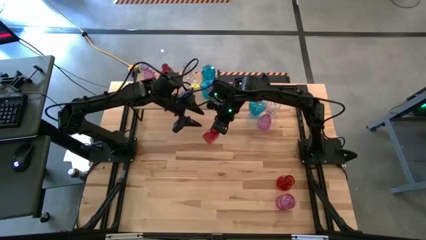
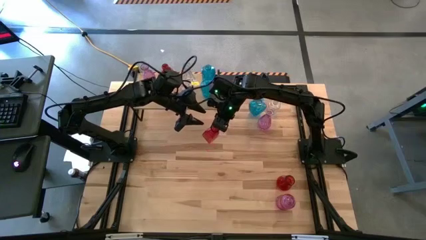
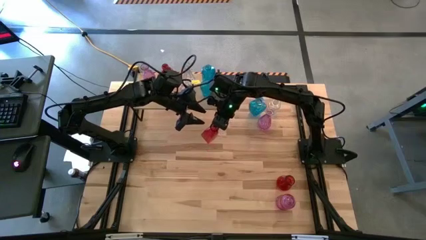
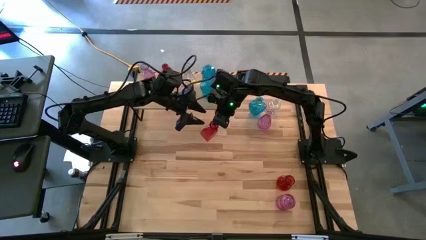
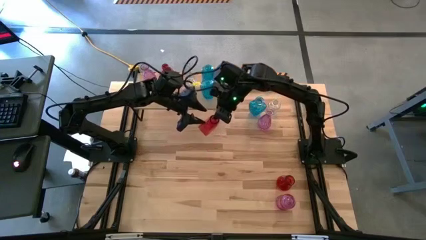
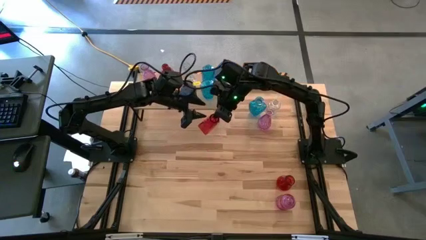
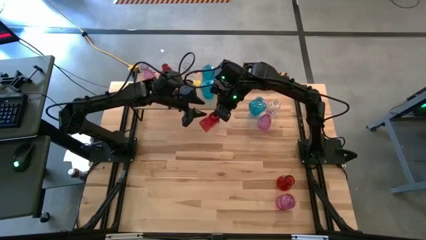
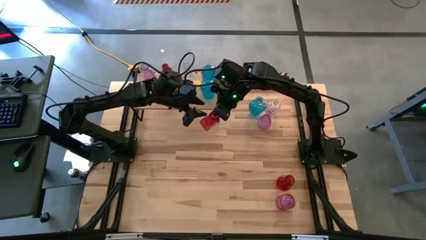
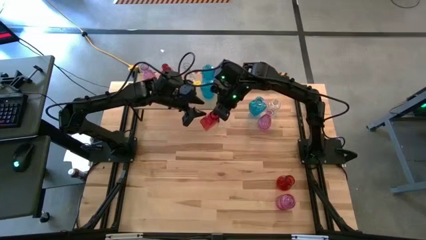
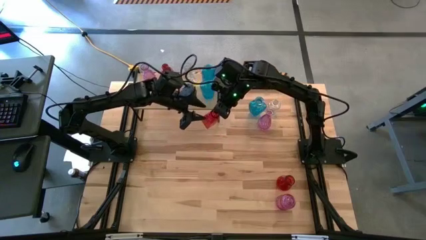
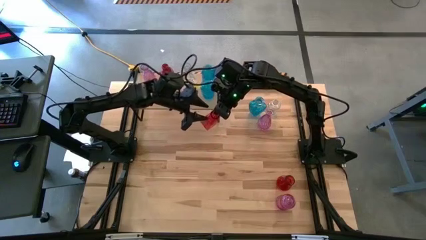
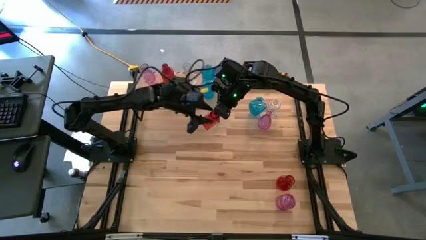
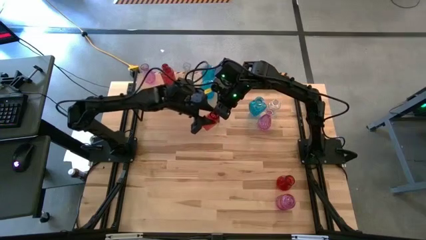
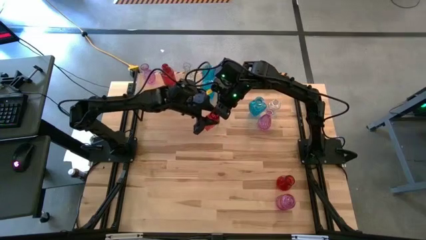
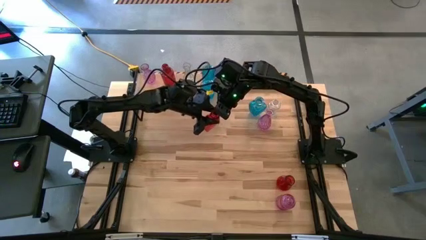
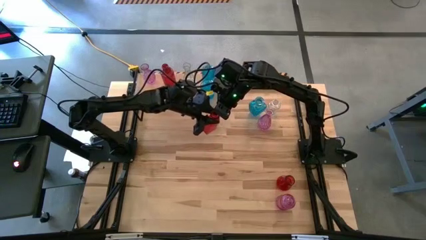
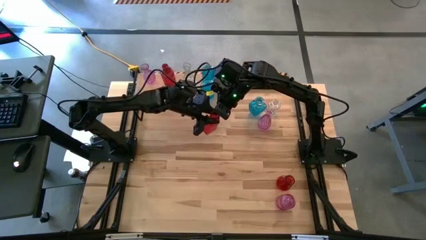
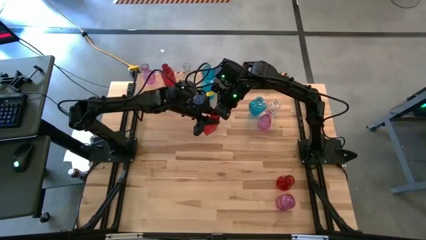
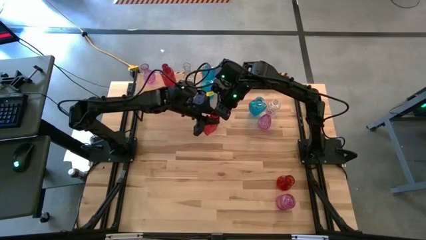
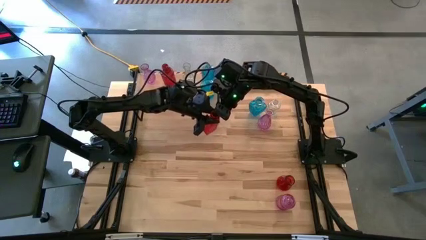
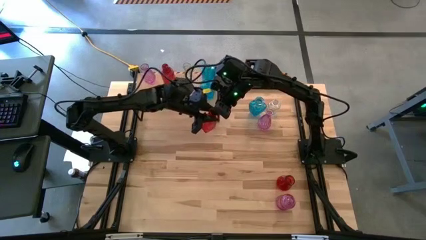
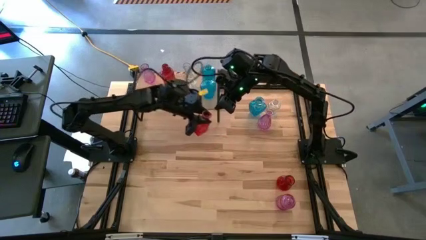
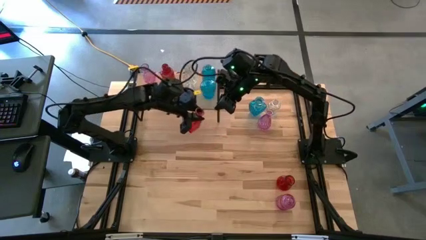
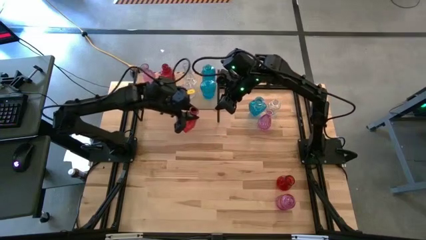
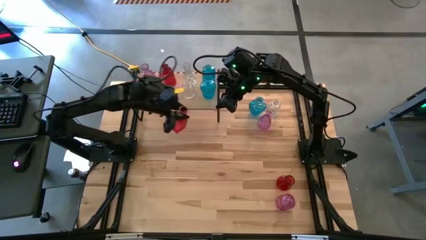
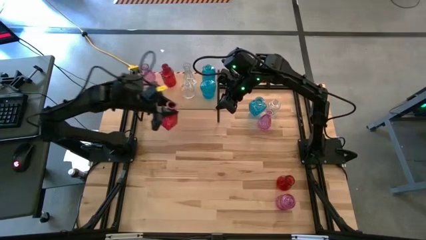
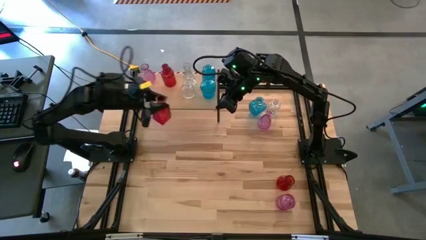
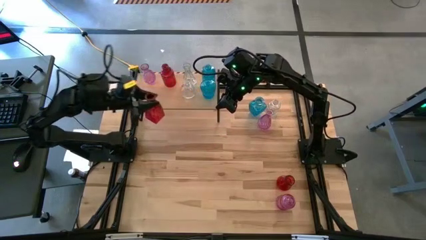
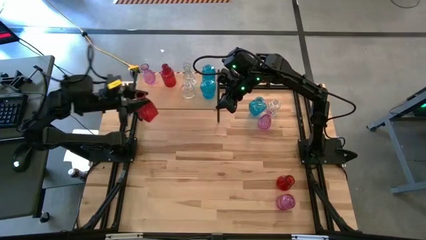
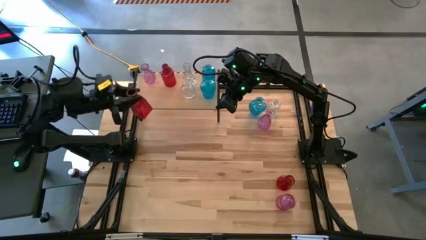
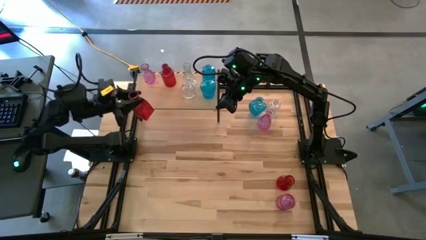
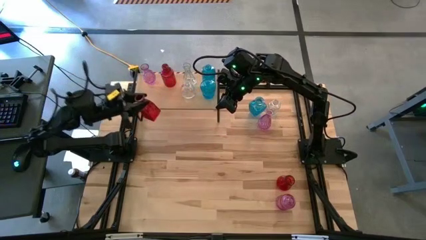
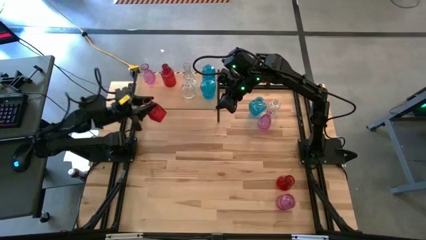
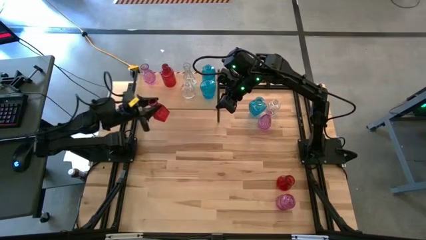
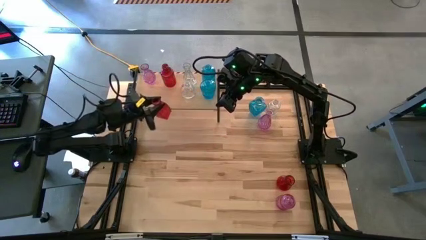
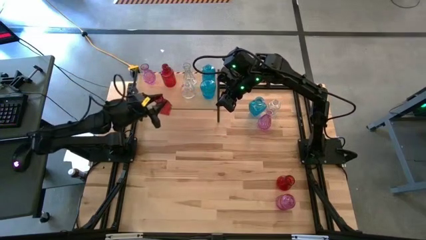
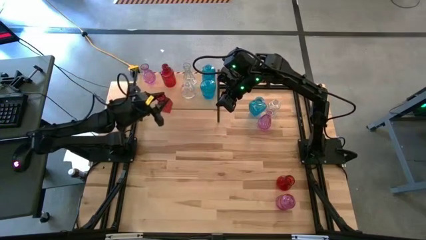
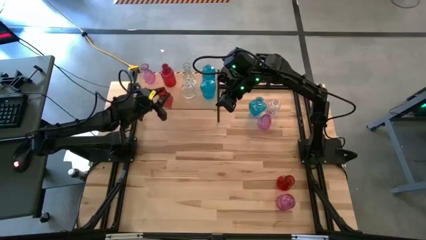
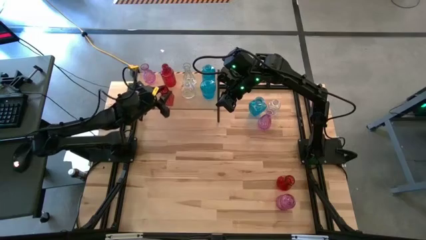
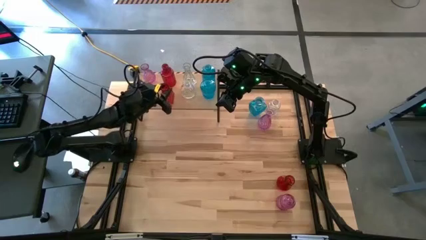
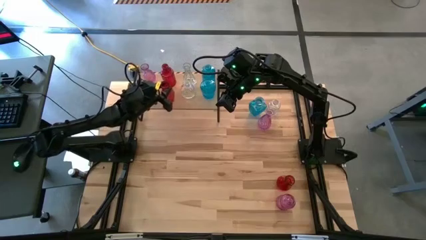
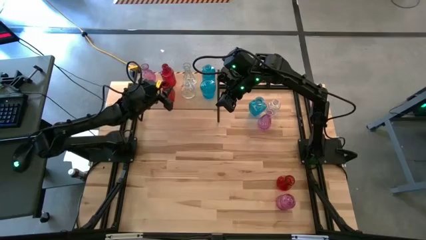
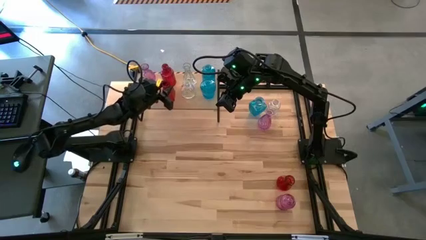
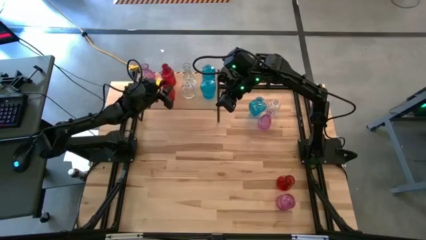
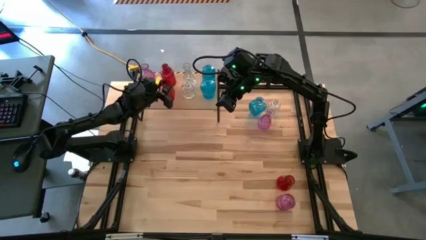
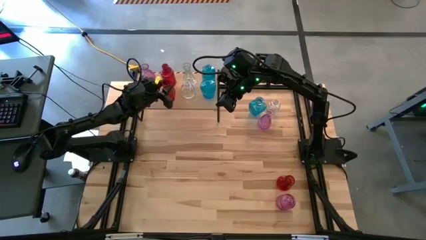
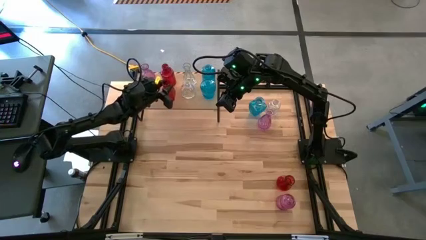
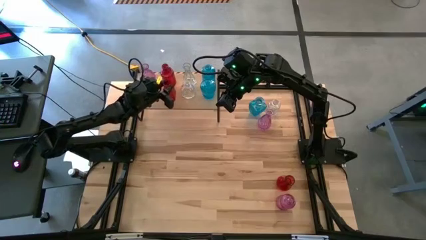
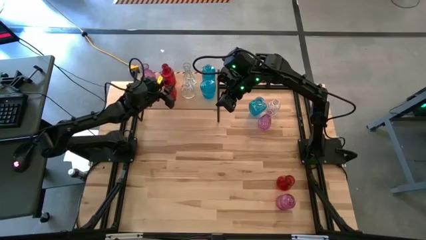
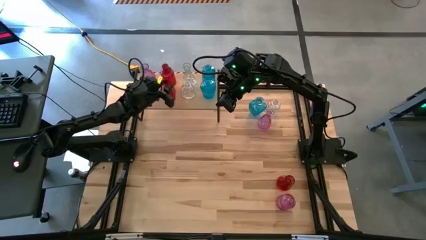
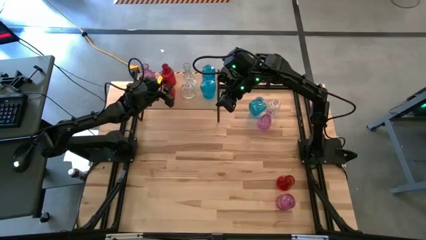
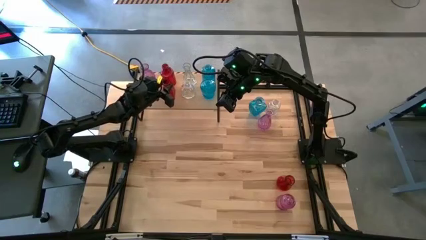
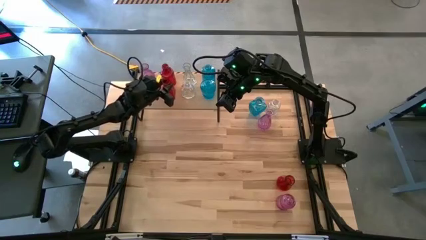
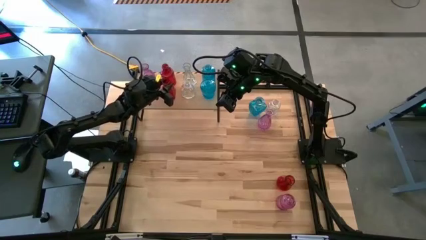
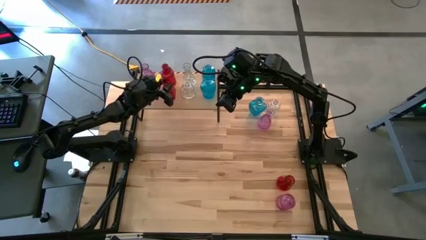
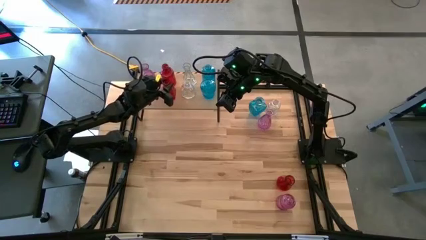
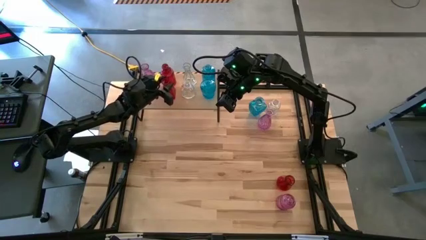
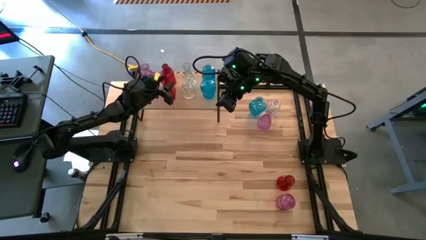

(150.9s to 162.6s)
Task: sort vases onto shelf
Put the left red vase on the shelf aligned with the other red vase

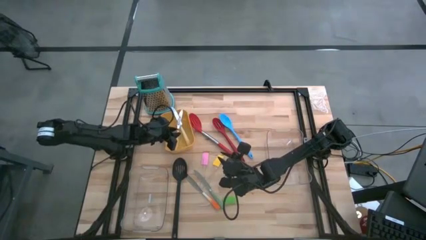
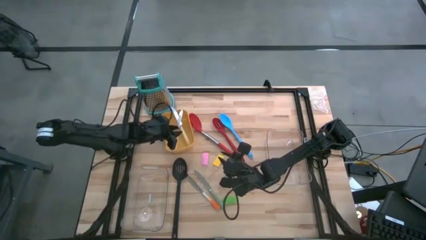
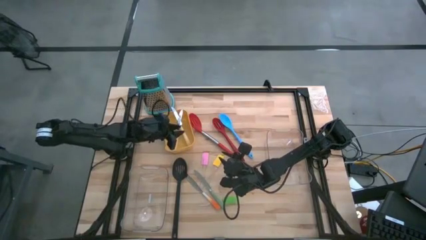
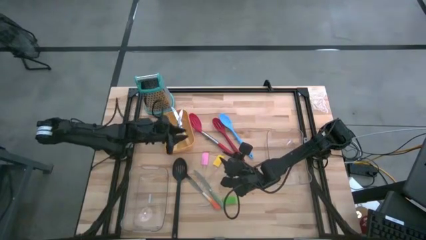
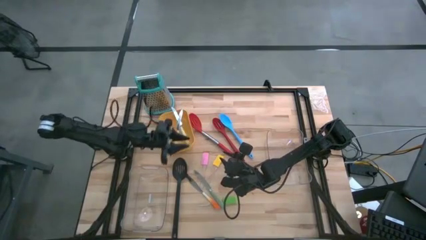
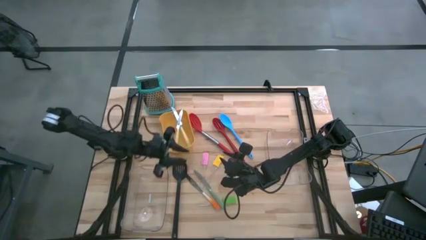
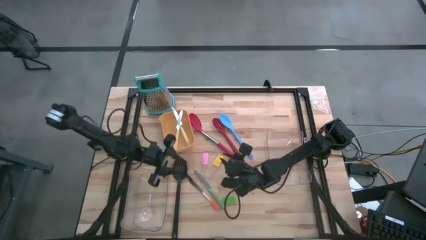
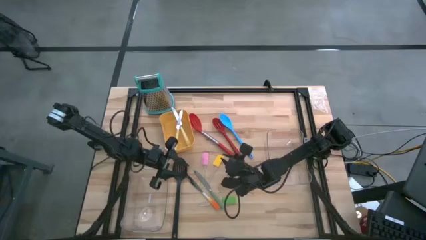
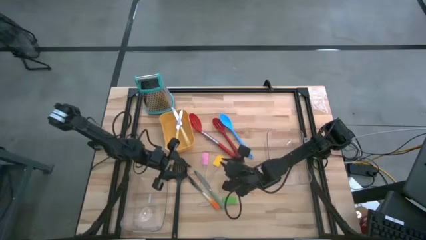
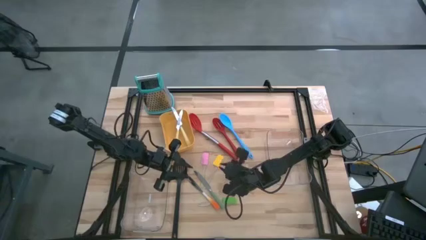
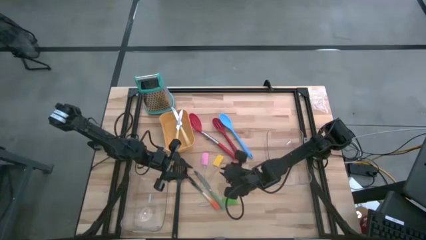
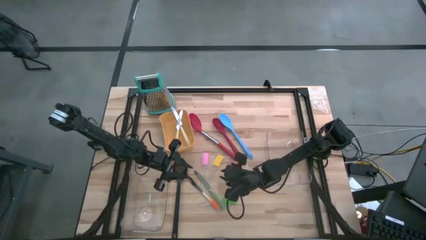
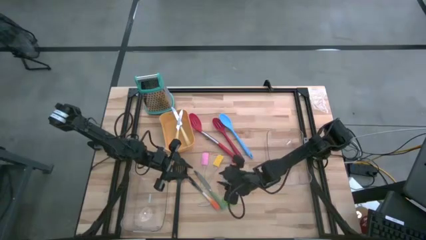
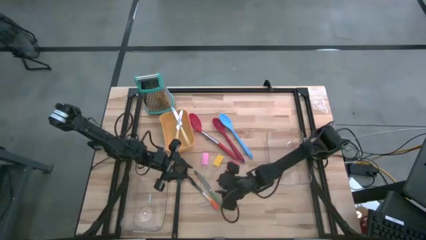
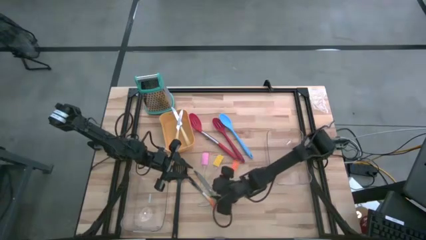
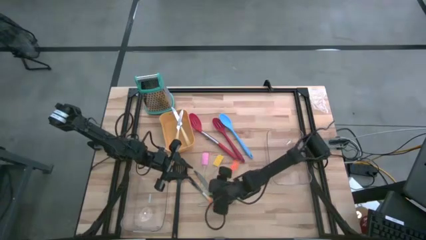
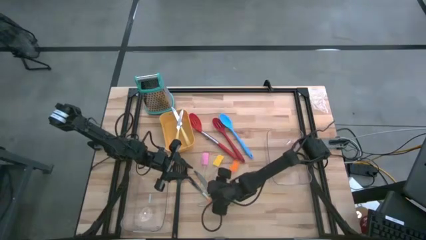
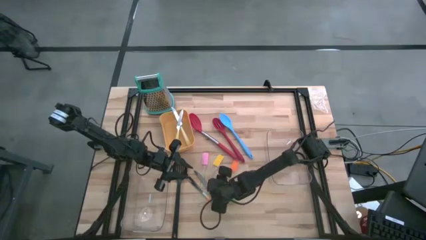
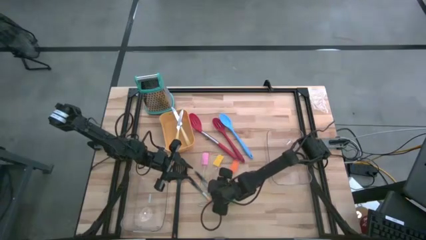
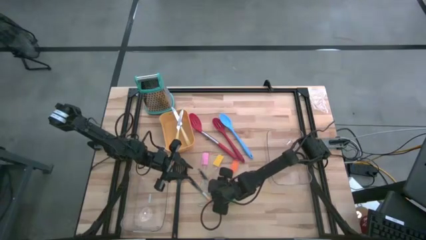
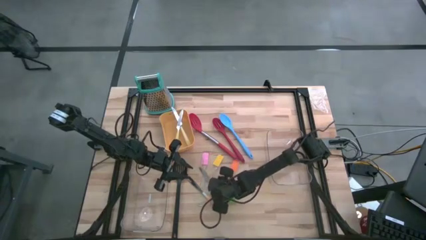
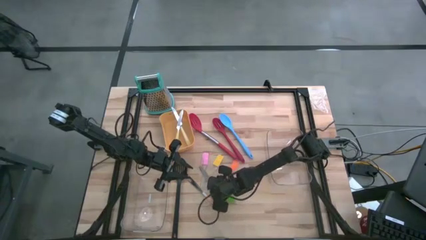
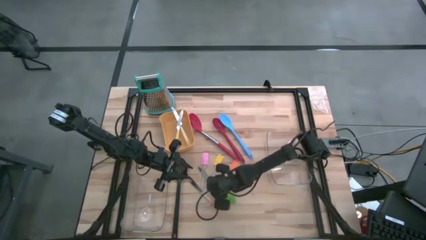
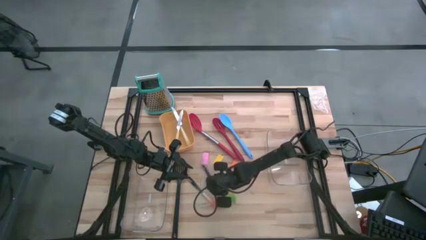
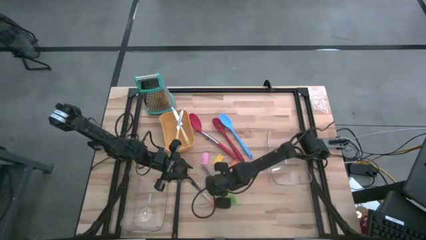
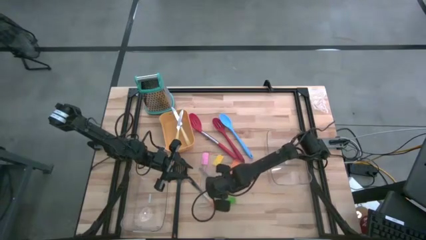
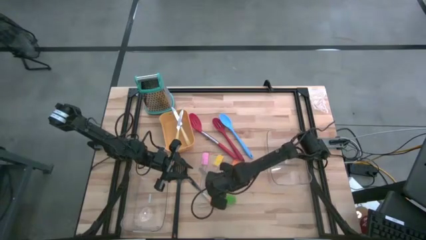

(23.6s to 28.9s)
Task: Pick & Place Kitchen Items
Put the green knife into the yellow bin
